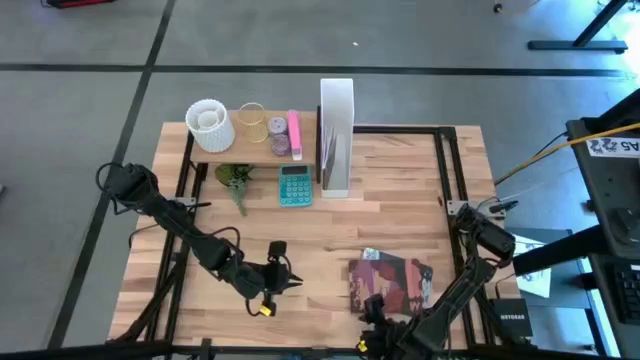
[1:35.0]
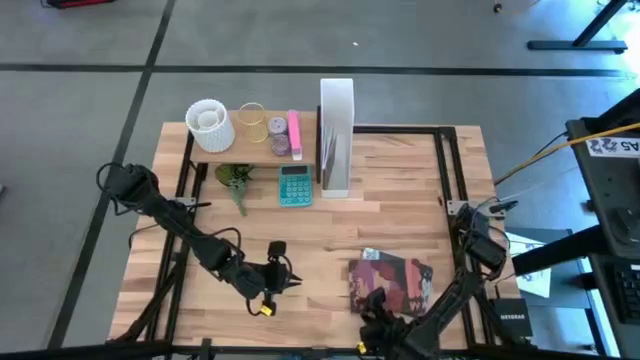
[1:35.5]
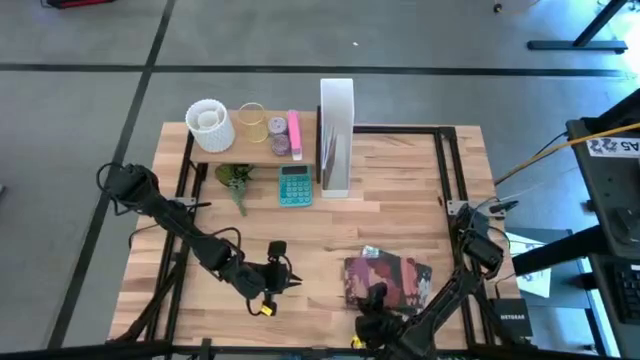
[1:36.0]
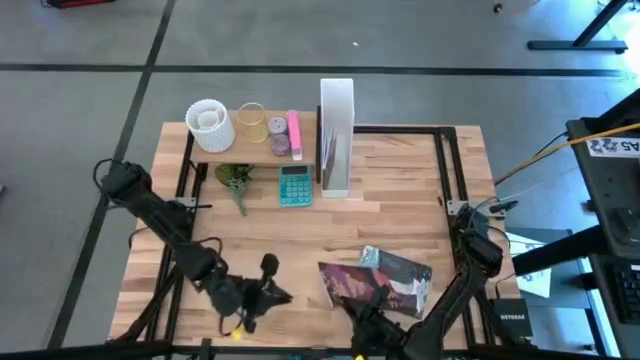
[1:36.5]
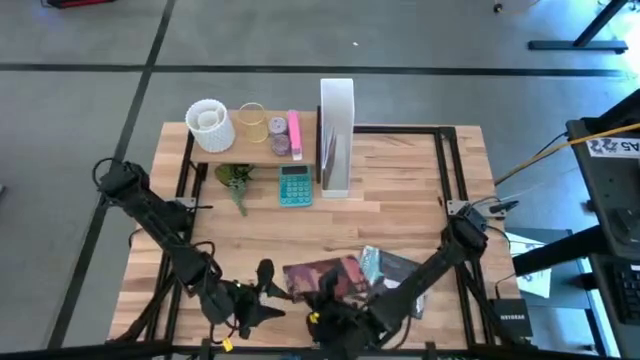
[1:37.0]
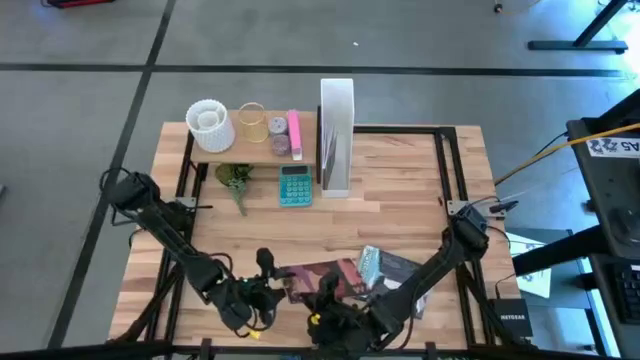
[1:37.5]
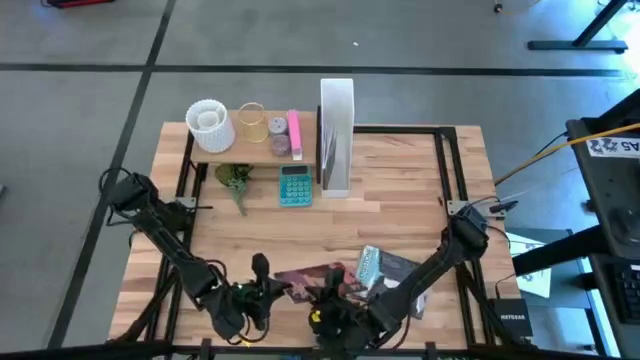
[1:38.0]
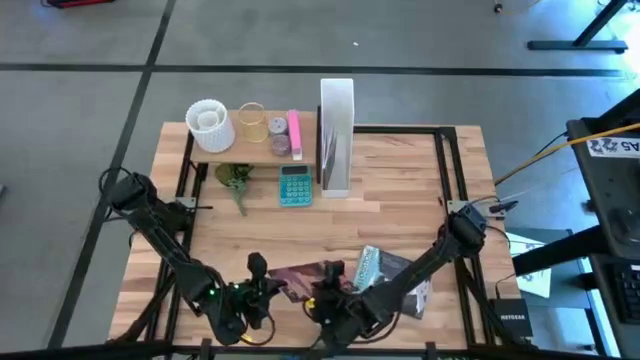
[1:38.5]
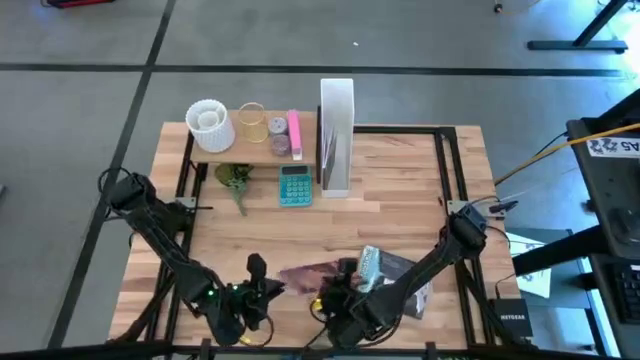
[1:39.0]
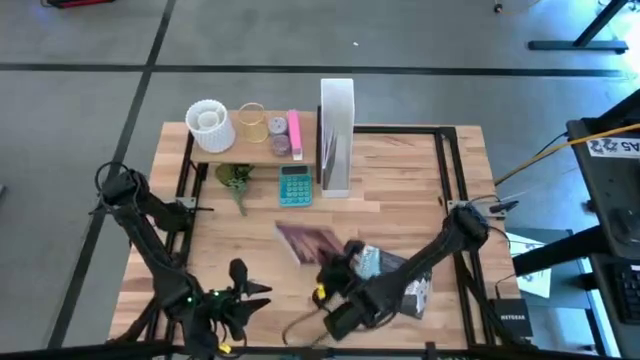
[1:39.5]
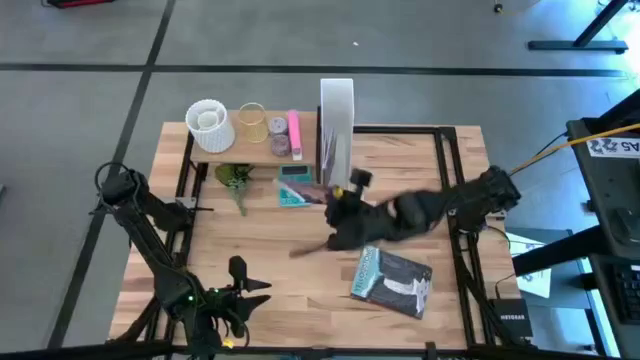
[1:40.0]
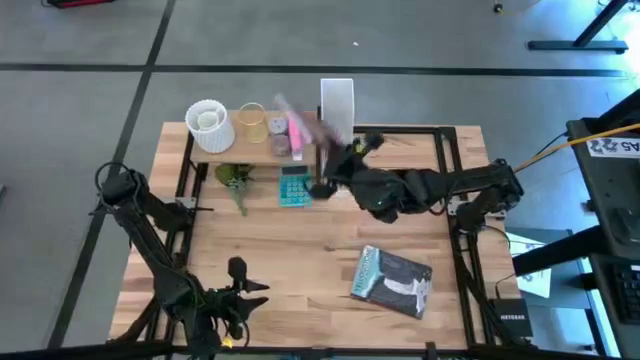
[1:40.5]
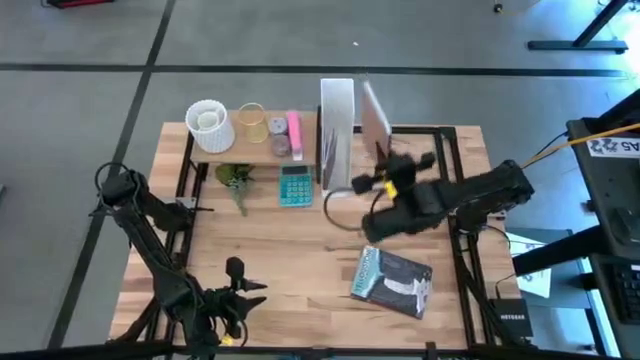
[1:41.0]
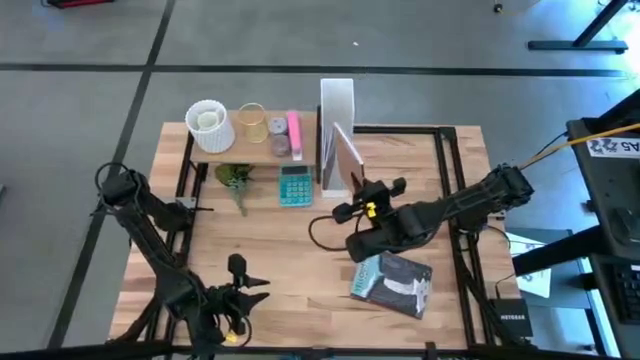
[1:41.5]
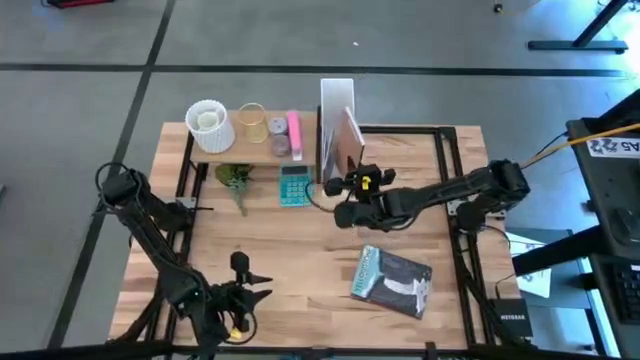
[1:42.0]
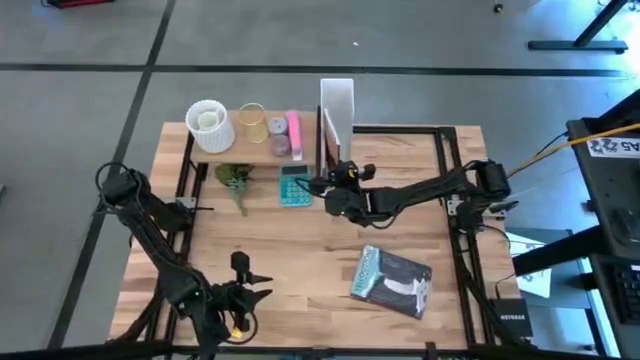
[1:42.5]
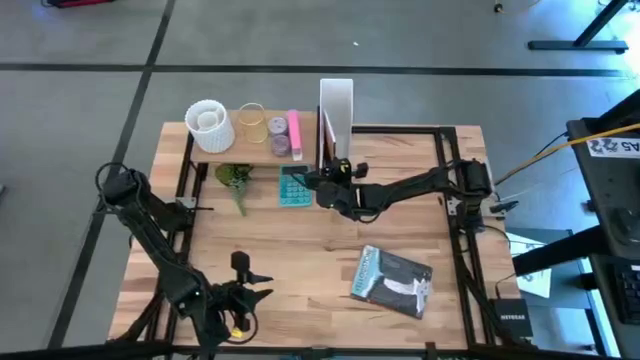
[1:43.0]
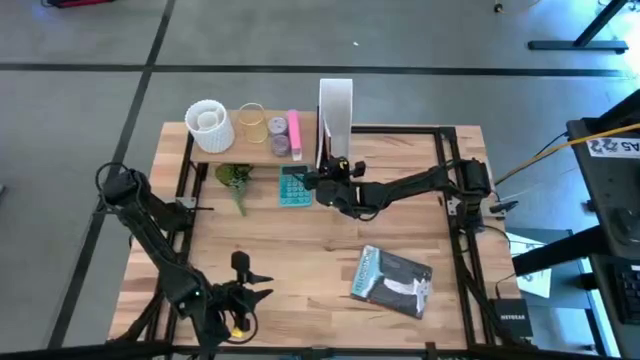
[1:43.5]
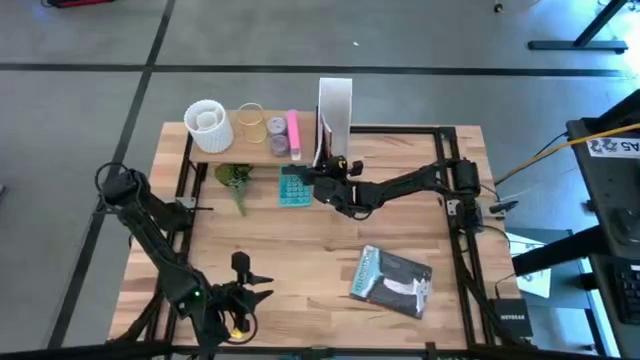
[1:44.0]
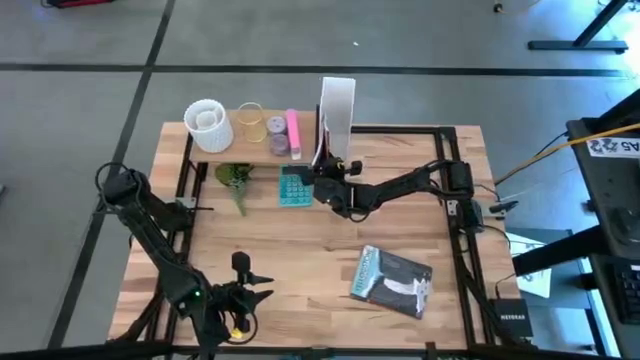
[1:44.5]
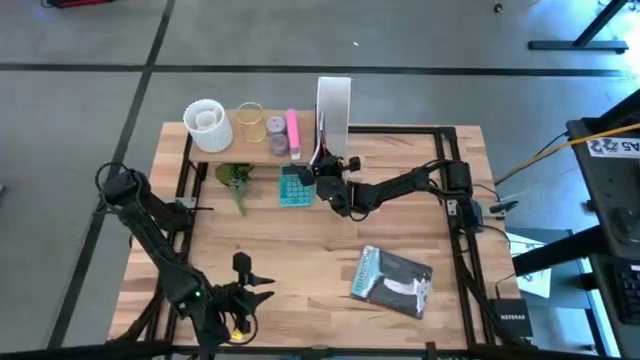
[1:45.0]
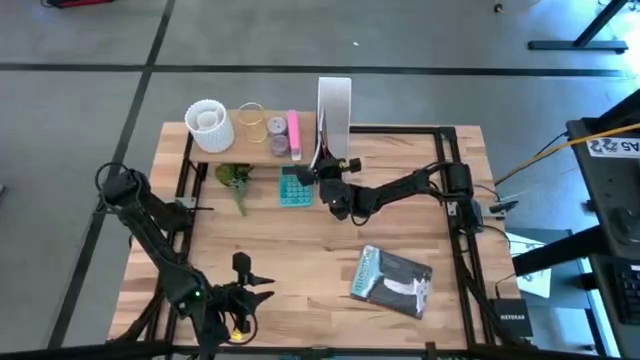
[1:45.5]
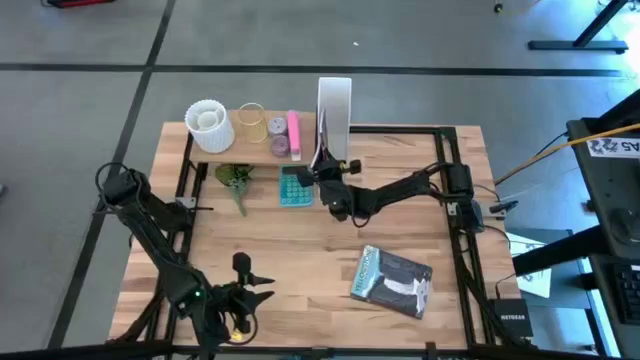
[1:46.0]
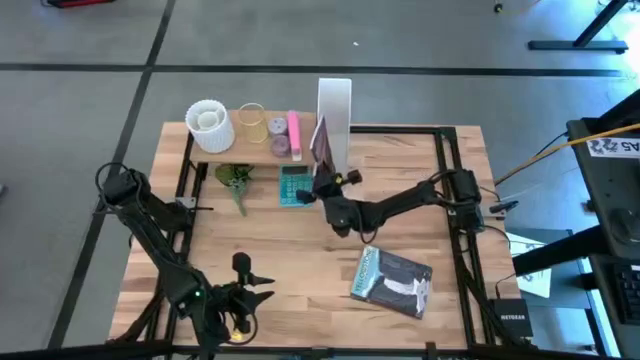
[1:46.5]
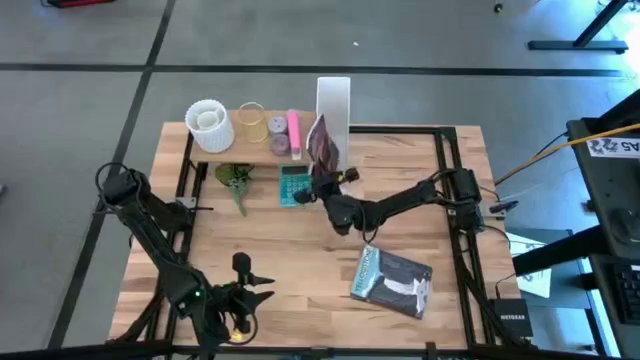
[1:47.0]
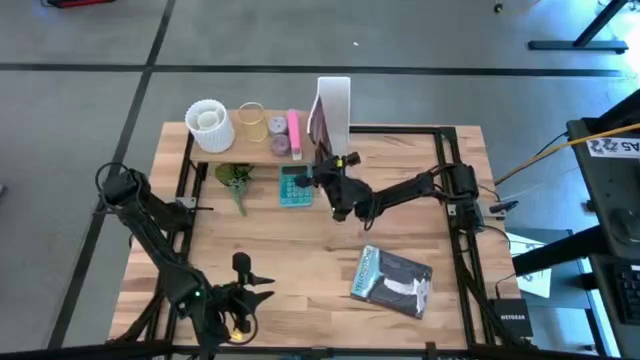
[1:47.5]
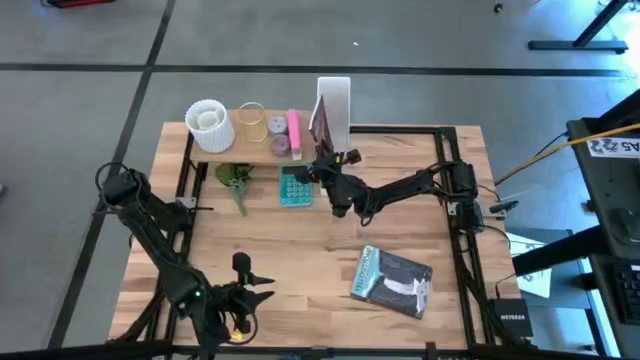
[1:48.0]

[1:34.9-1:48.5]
Task: Stock shelves
Put the purple book into the white bookshelf

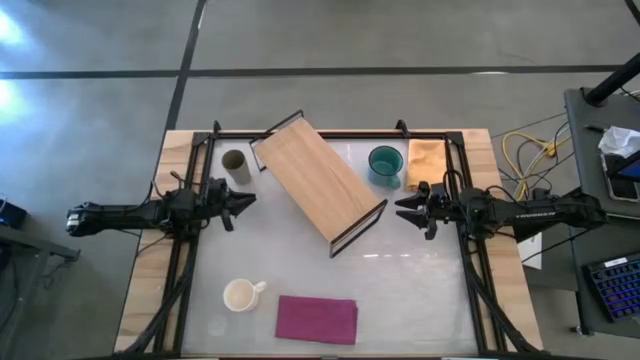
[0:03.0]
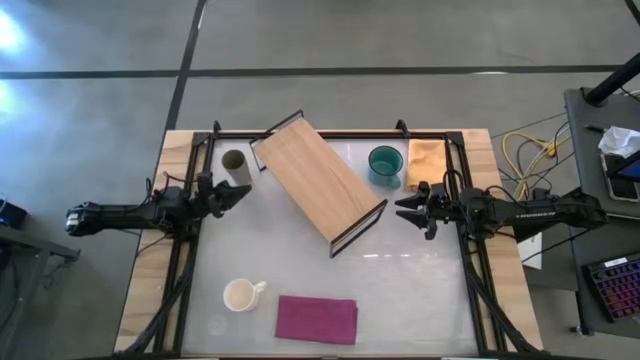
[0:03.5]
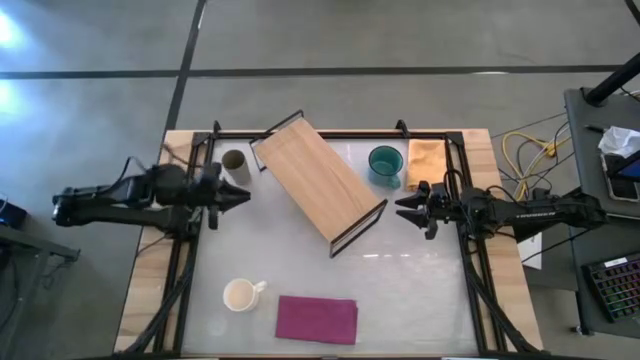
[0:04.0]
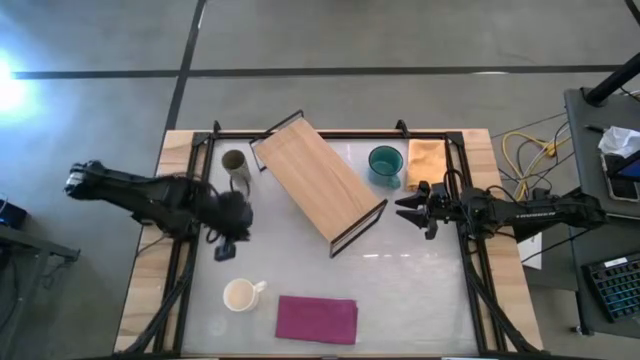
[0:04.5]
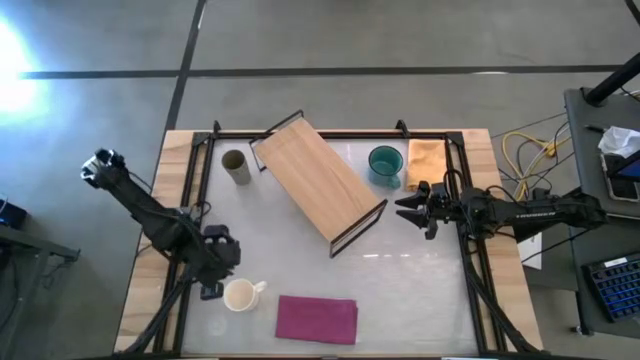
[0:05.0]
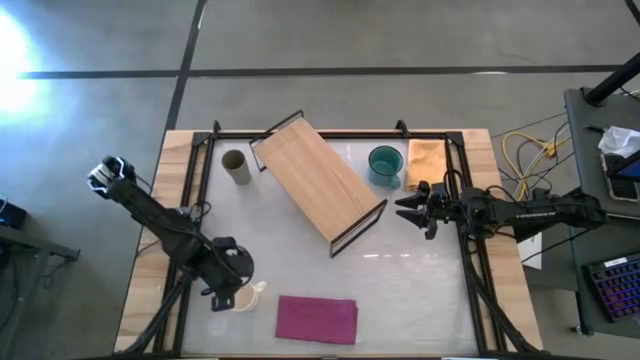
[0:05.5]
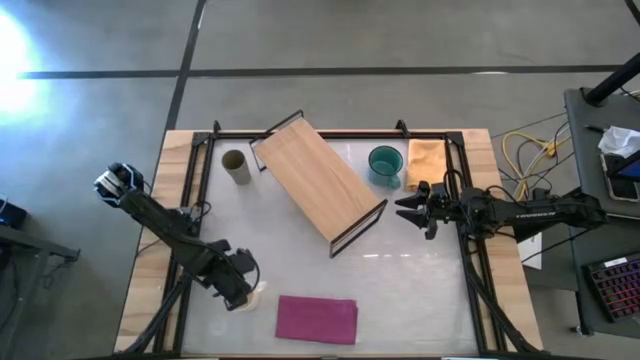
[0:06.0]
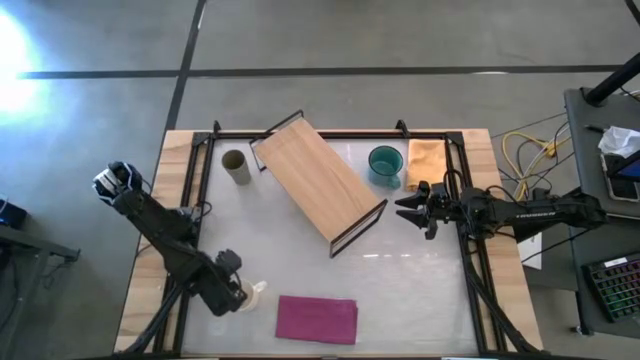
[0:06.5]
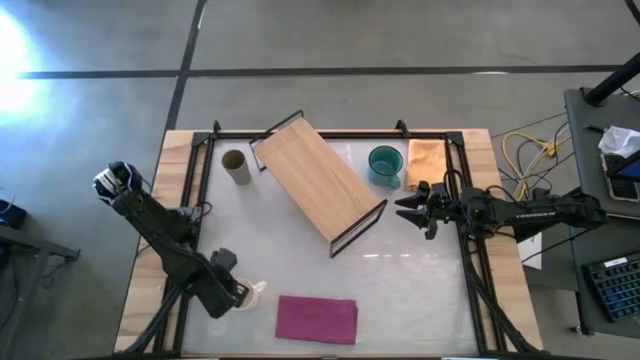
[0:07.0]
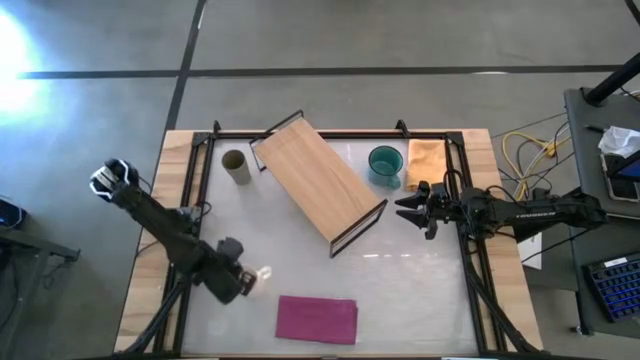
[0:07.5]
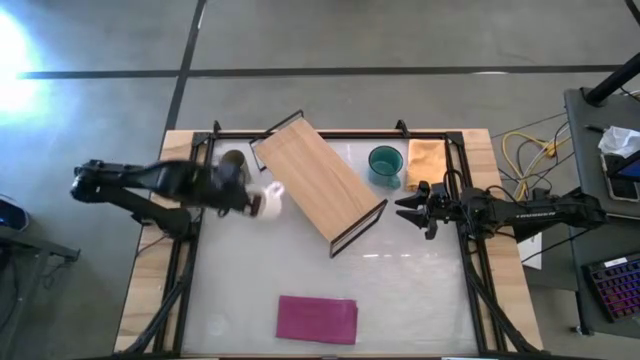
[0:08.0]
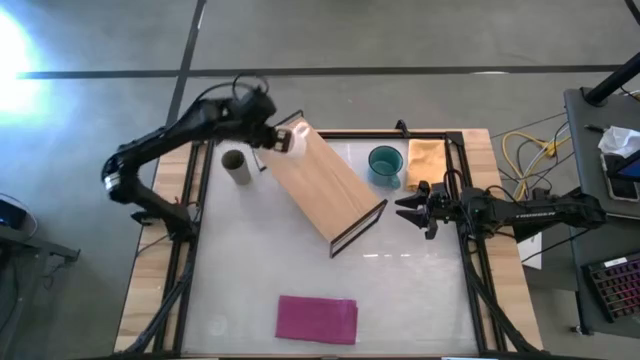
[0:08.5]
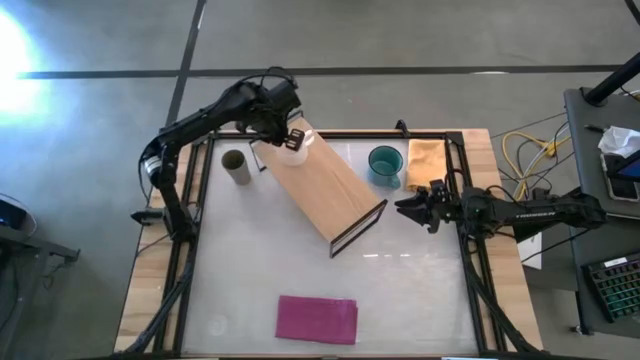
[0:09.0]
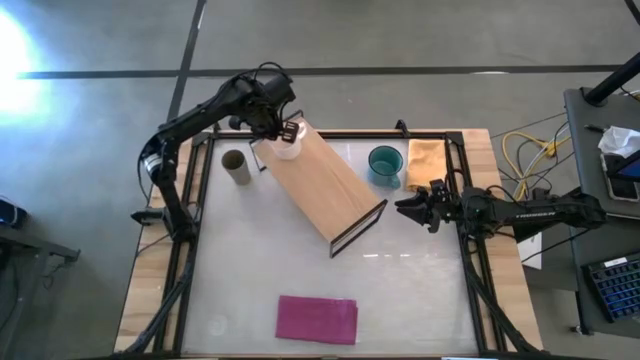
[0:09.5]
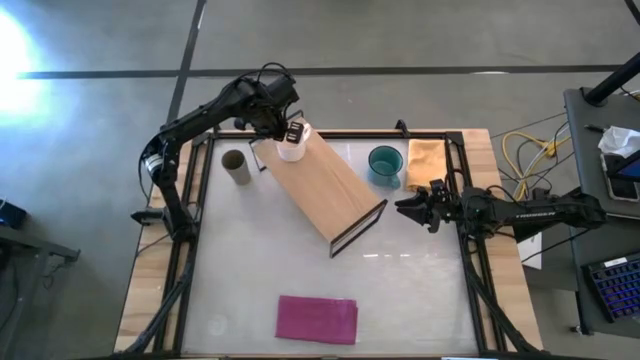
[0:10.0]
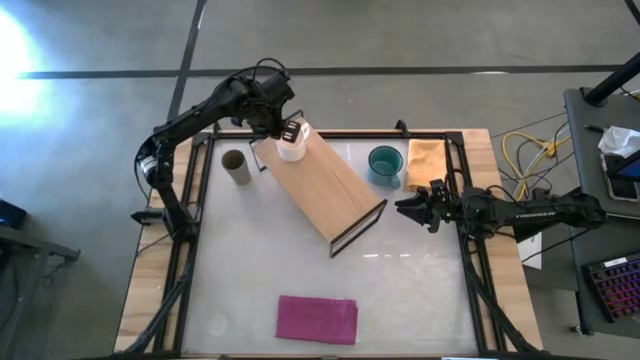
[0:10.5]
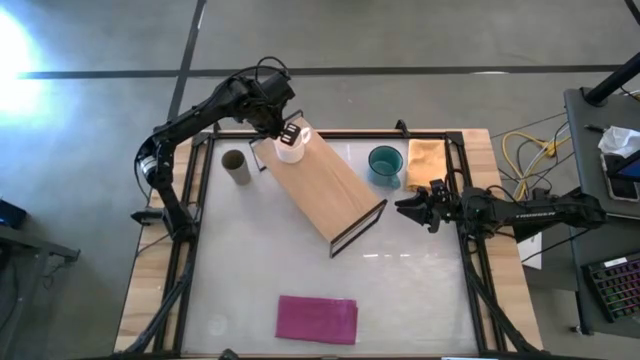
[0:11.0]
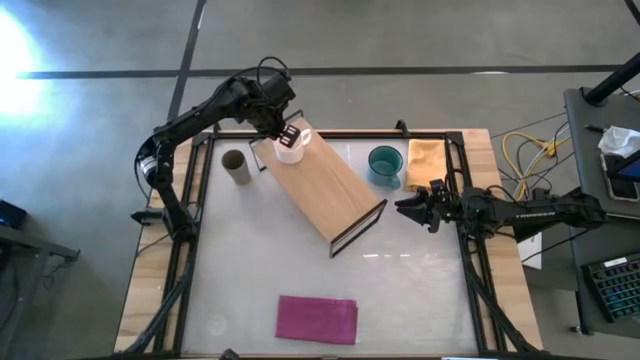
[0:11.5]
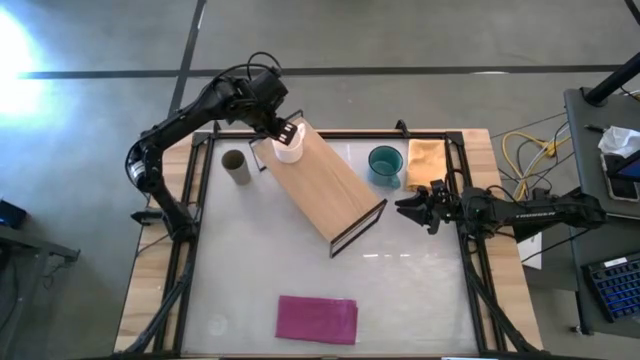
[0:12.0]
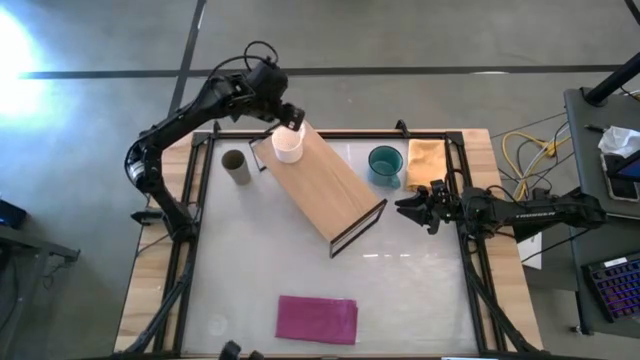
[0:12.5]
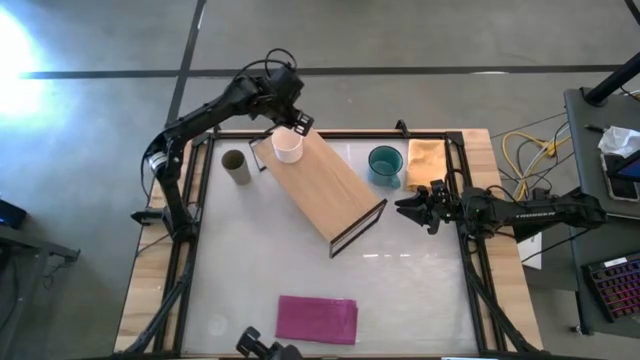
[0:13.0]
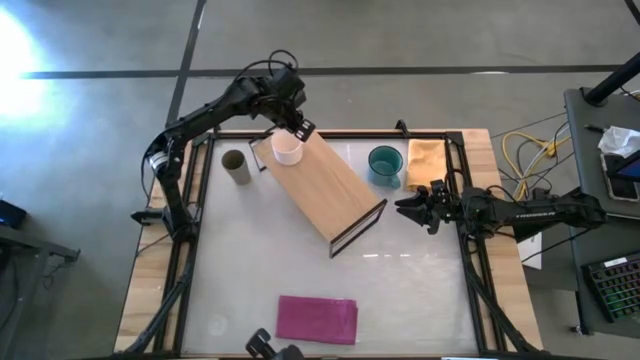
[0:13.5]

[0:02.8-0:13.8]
Task: Stack small to large cups/mugs on shelf
Put the white mug on the shelf
